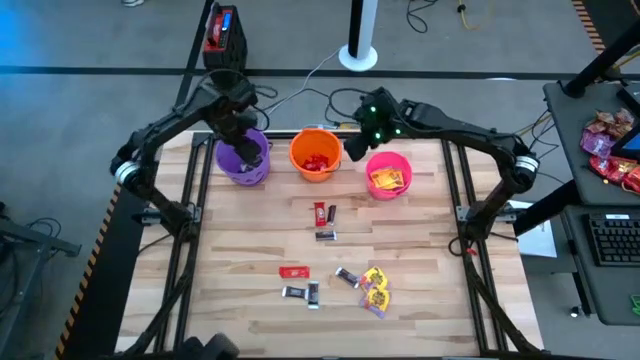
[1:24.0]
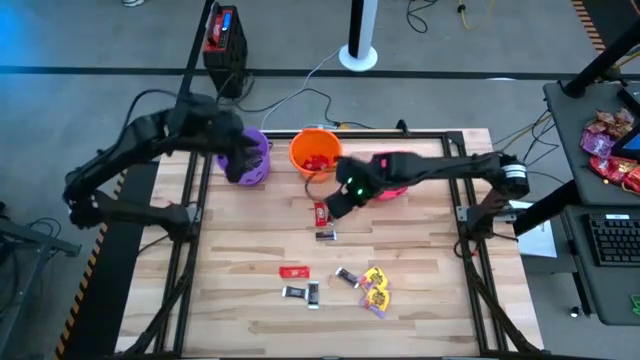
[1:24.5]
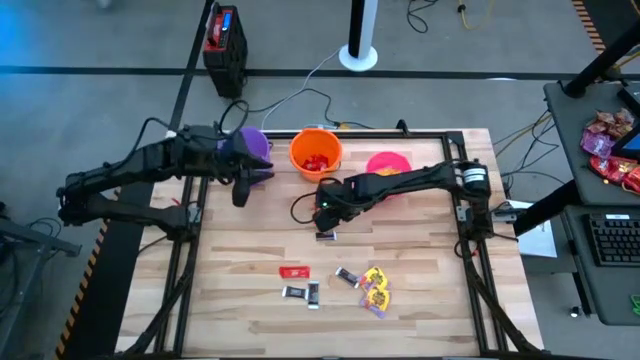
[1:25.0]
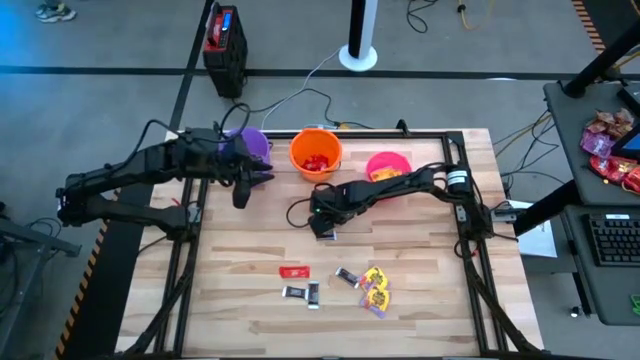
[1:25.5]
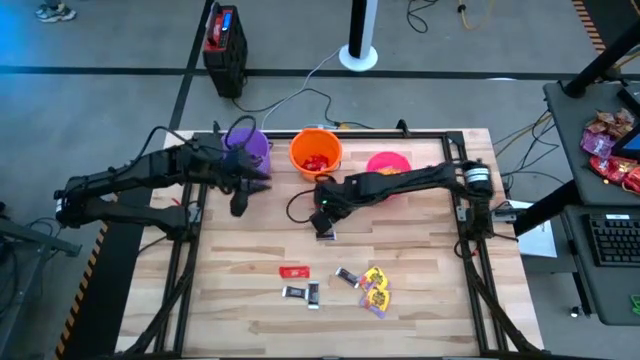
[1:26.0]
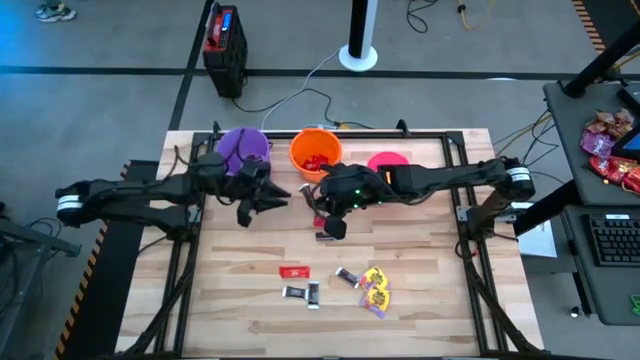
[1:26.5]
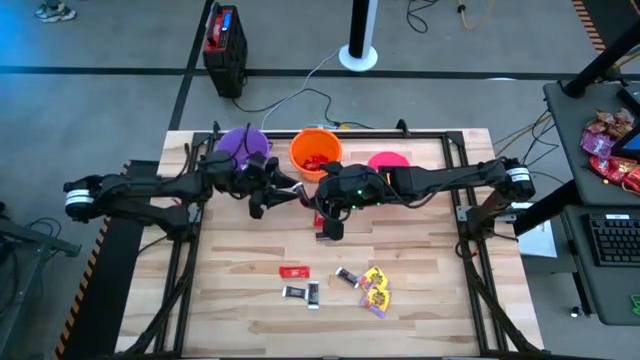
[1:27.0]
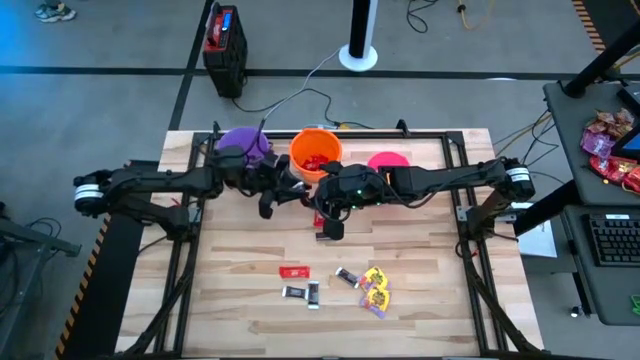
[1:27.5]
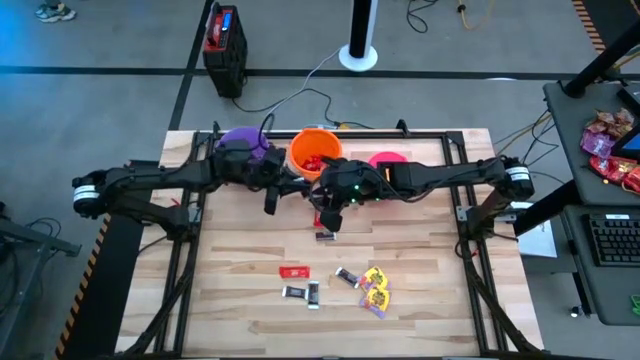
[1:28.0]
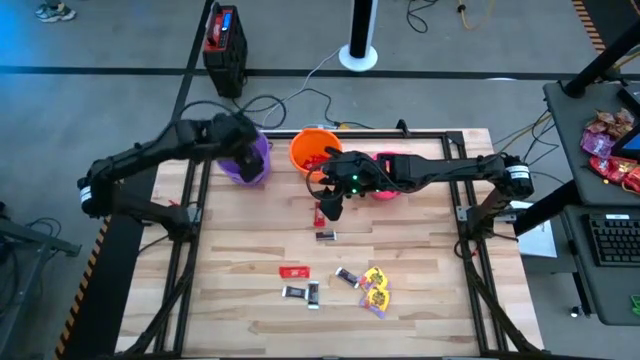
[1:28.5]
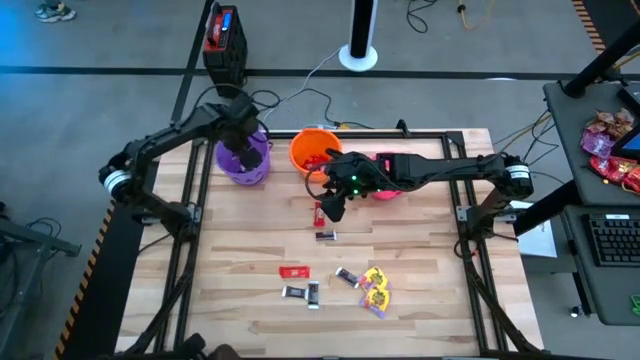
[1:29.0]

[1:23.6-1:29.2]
Task: Sort candy by brand, put in halloween buckets
Put the black candy into the violet bucket

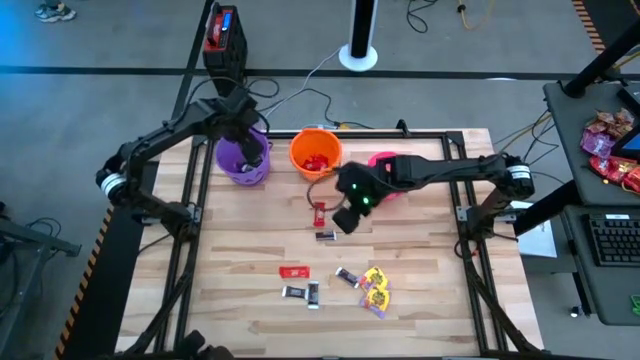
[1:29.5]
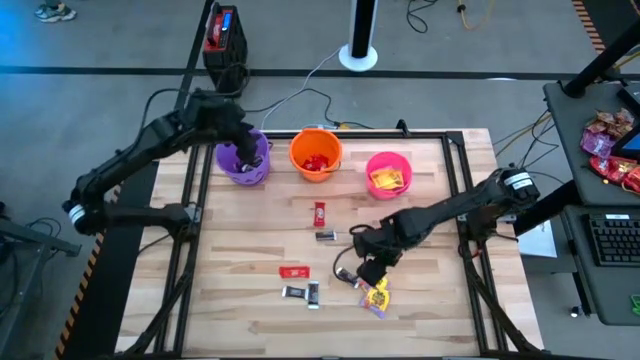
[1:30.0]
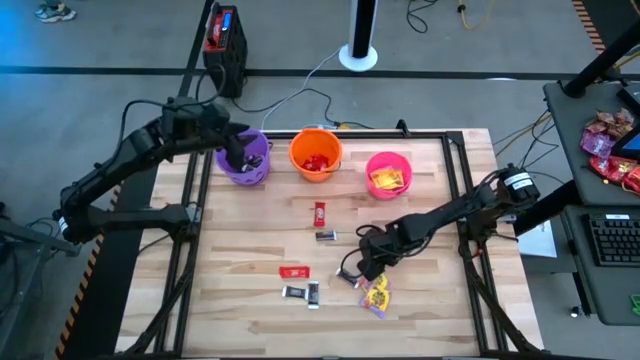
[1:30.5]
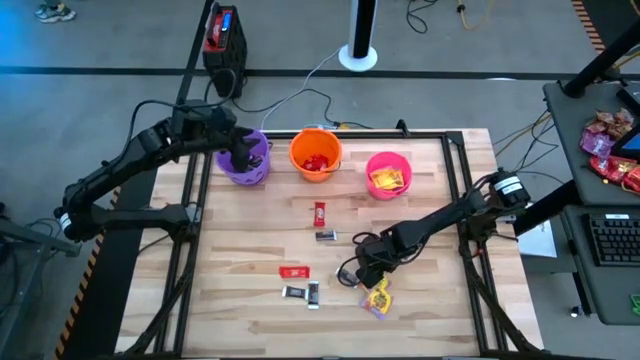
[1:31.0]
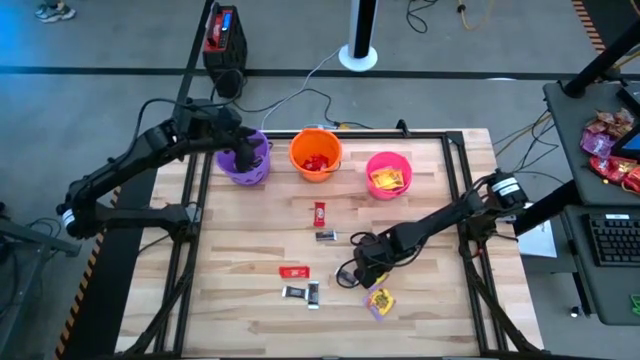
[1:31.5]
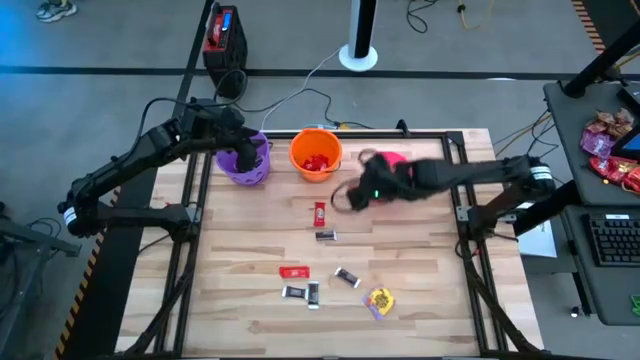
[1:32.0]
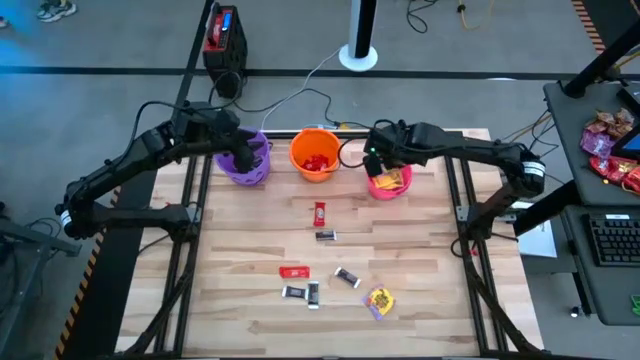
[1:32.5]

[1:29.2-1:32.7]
Put the yellow candy into the pink bucket

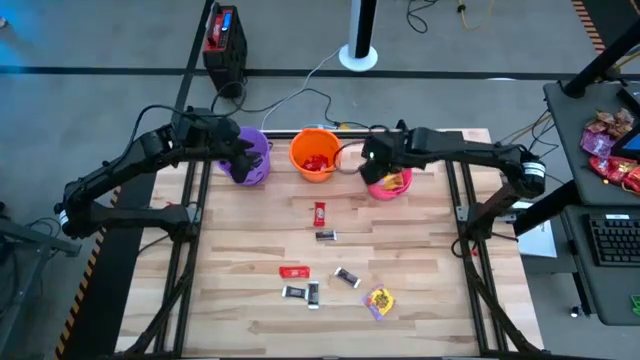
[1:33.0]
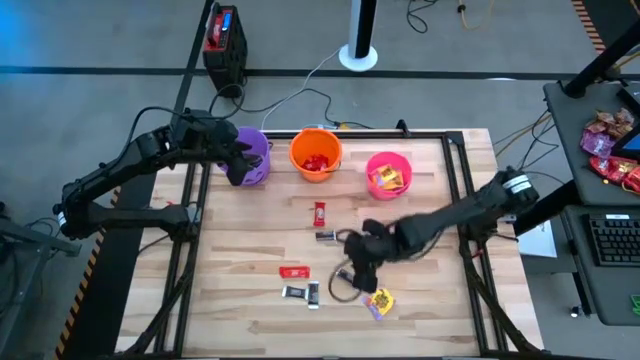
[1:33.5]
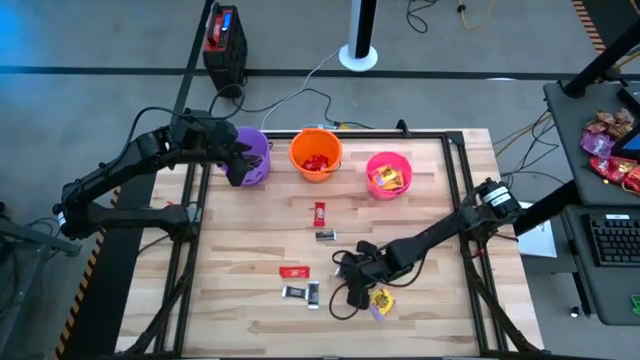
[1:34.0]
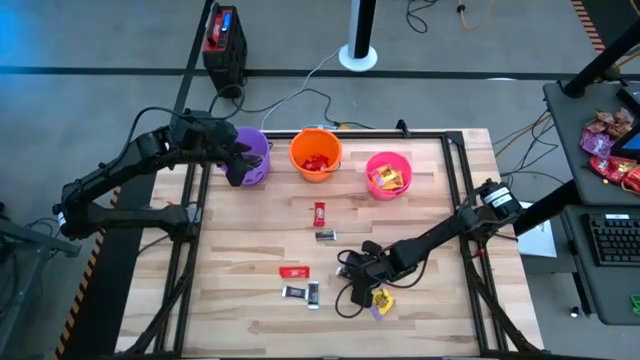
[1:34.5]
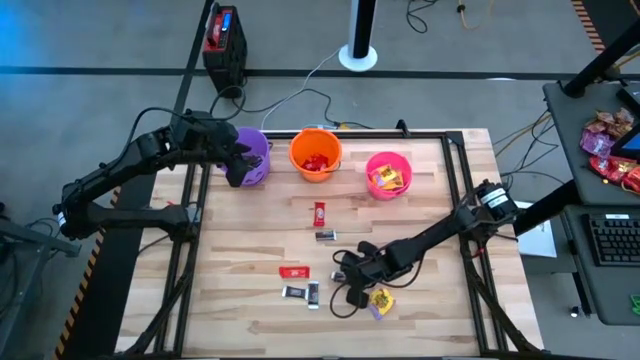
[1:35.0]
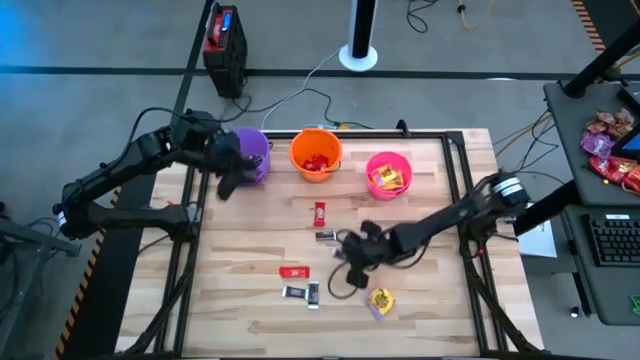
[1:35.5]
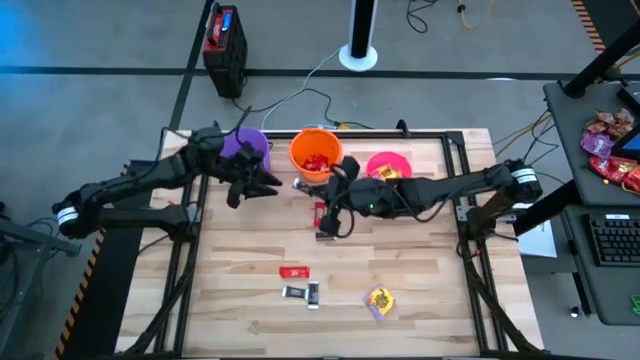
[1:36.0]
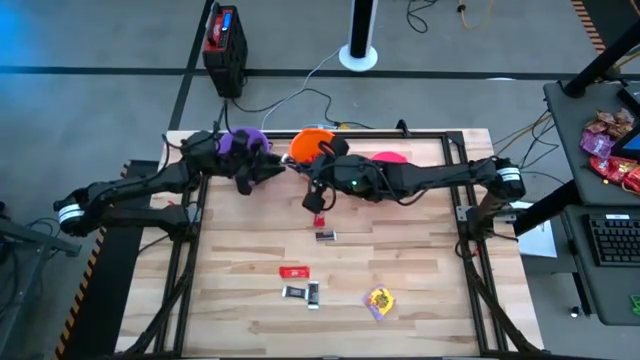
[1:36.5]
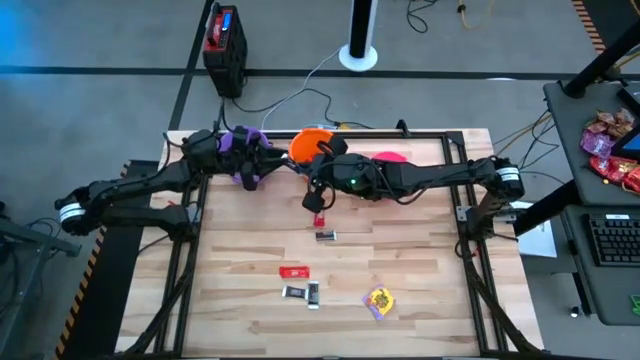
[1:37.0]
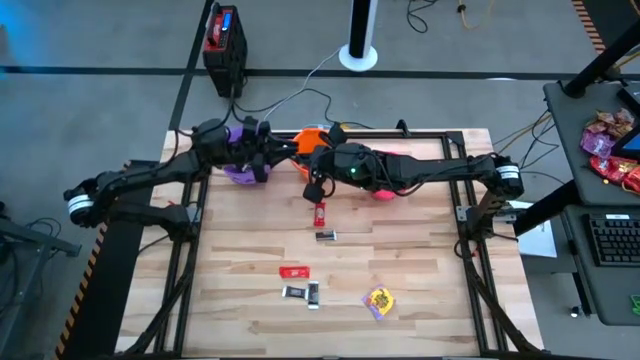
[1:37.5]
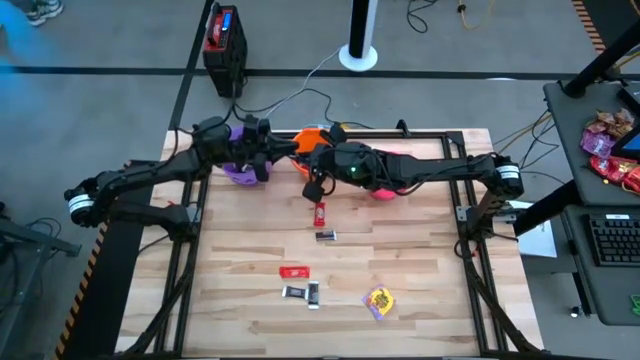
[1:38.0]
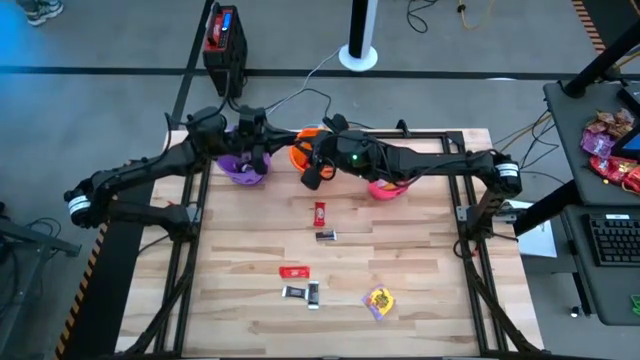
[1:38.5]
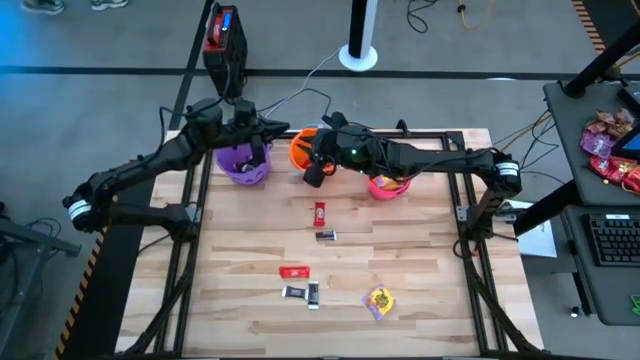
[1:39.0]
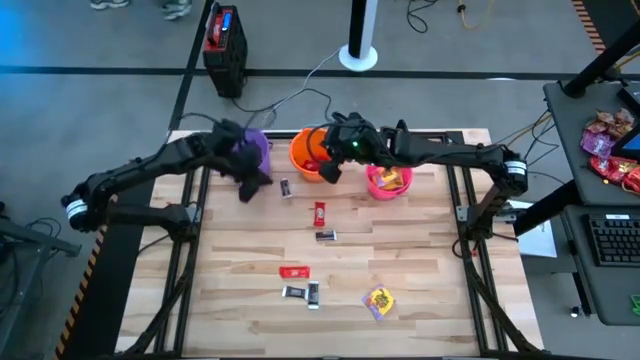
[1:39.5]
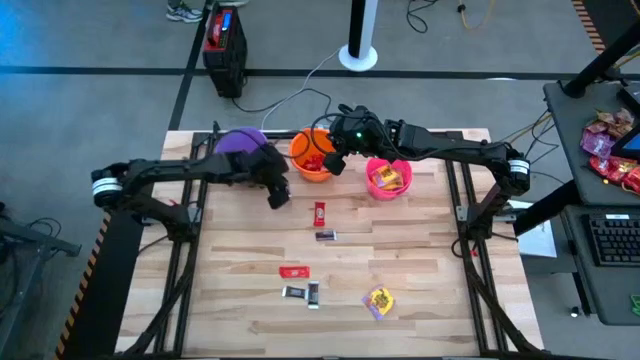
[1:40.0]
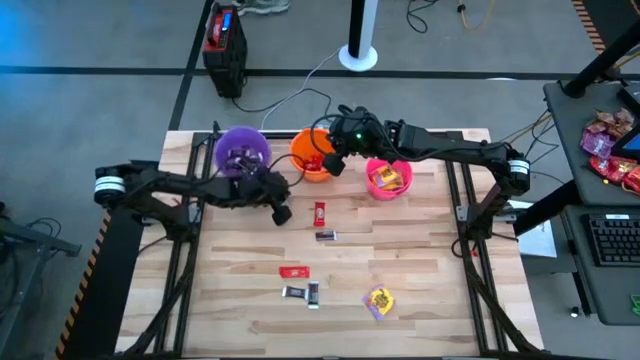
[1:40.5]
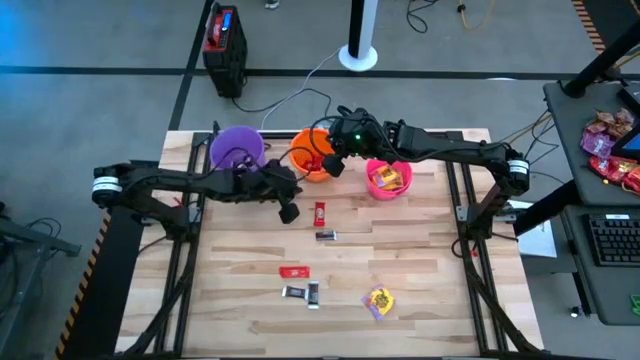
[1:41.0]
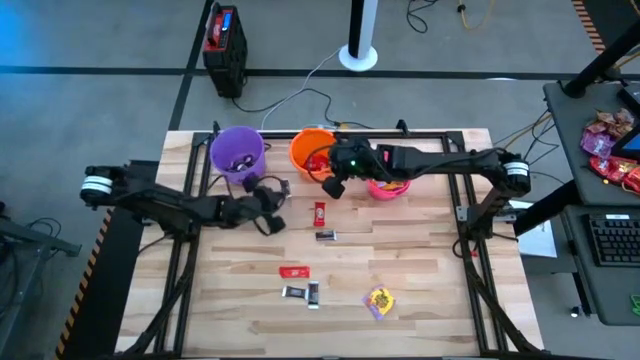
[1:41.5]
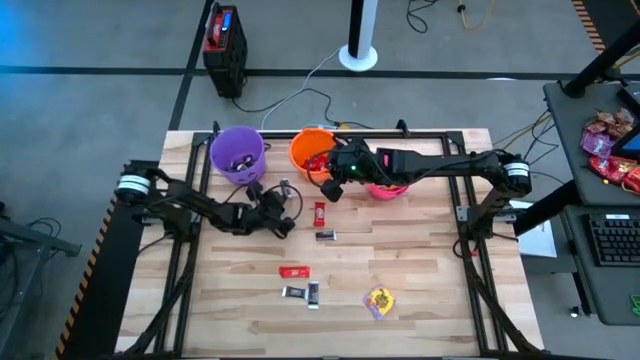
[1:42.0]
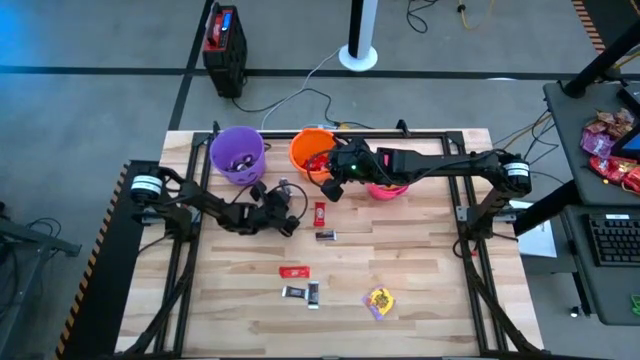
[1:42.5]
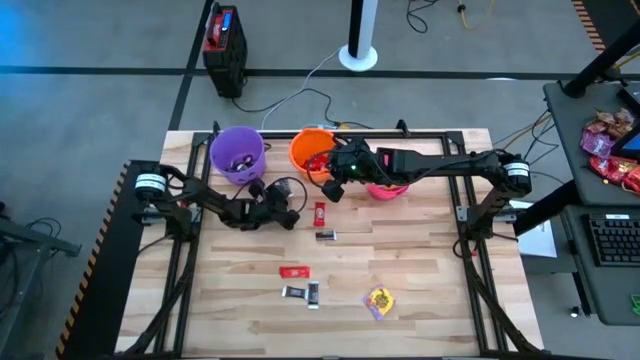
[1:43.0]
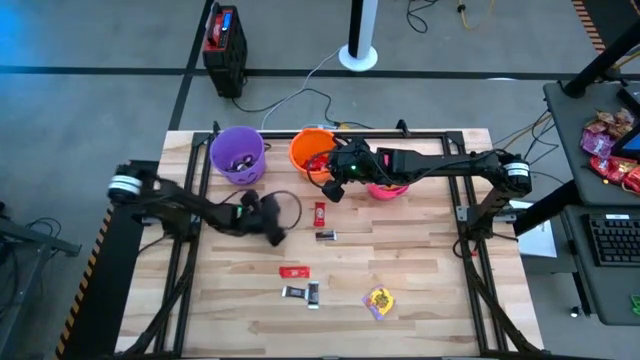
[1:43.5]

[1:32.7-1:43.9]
Put the black candy into the violet bucket

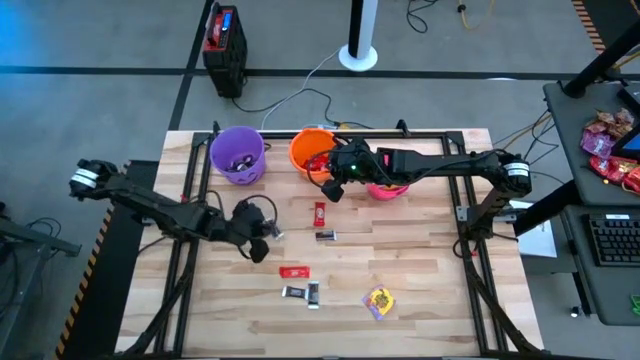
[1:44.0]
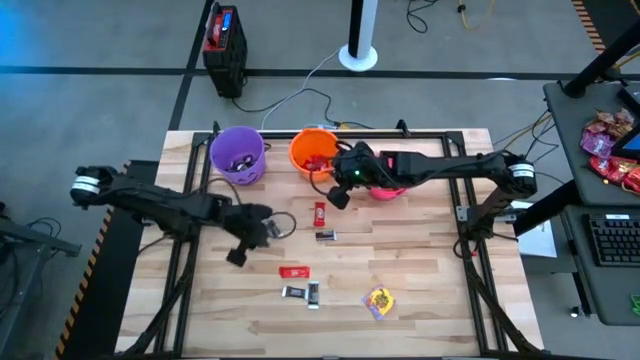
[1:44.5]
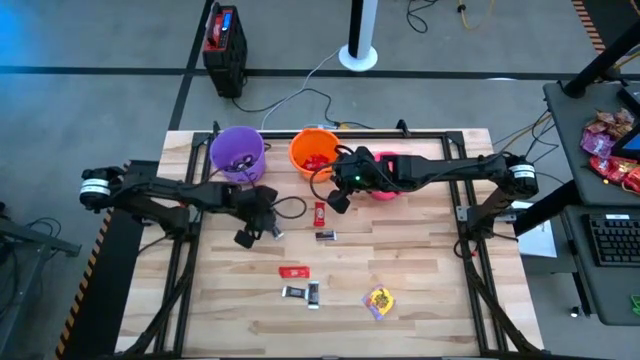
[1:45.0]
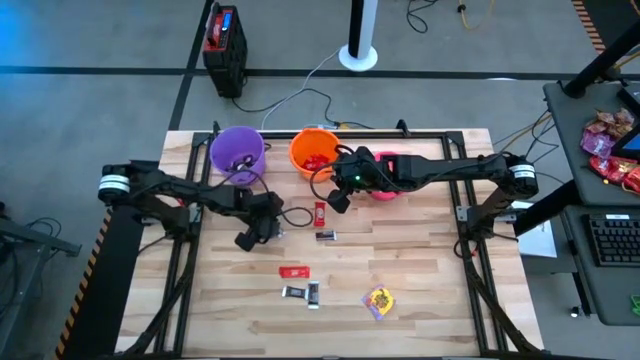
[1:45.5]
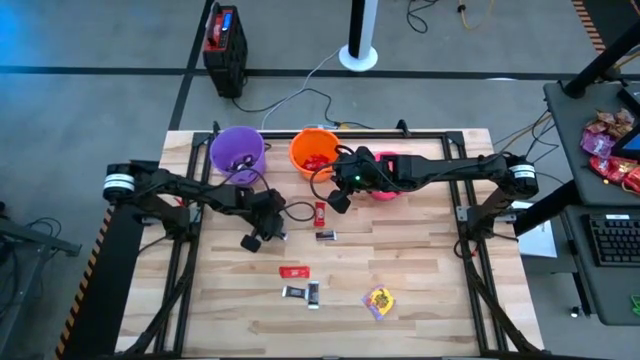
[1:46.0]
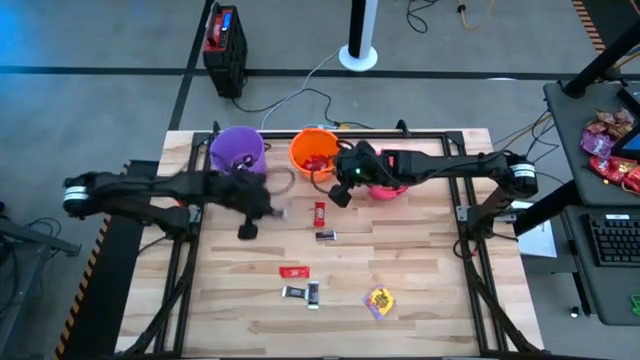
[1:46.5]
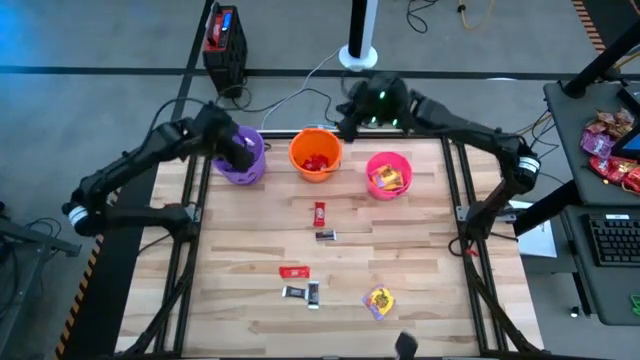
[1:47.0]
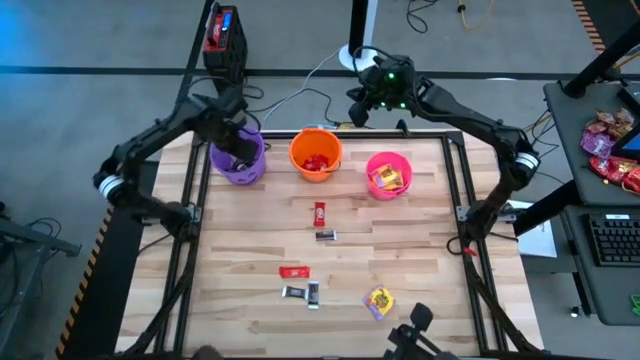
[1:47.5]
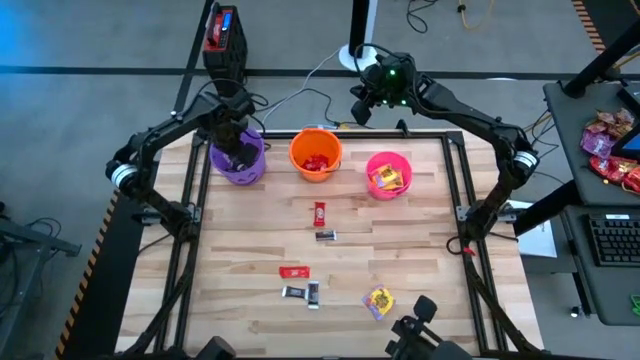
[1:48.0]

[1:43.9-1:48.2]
Put the black candy into the violet bucket
